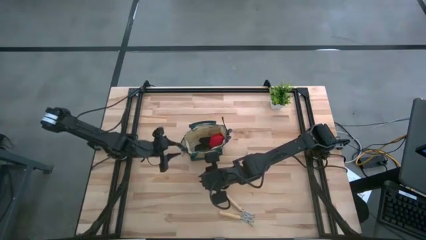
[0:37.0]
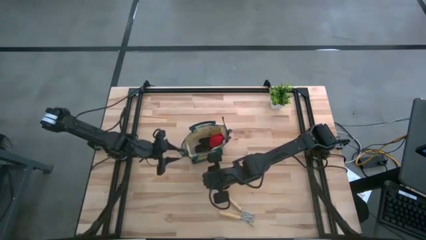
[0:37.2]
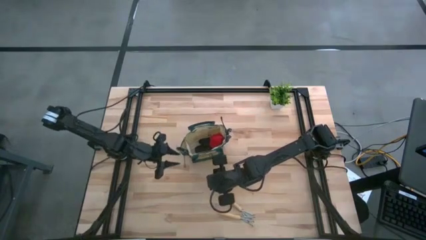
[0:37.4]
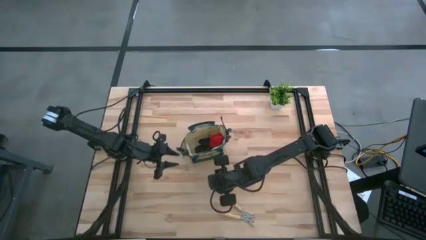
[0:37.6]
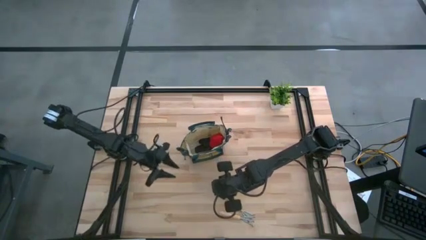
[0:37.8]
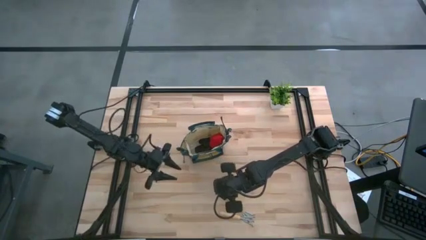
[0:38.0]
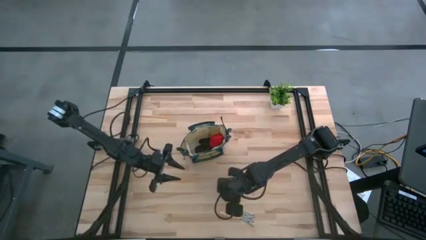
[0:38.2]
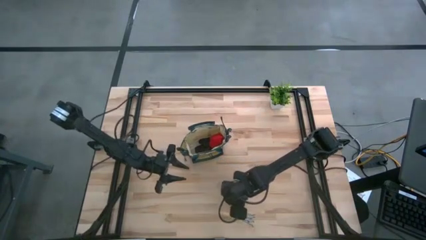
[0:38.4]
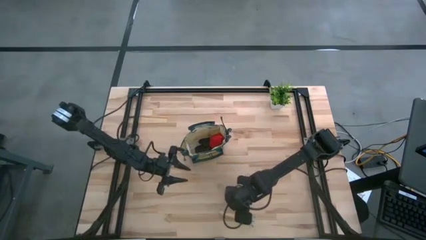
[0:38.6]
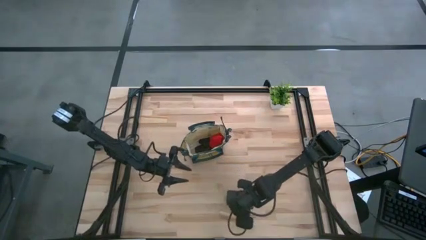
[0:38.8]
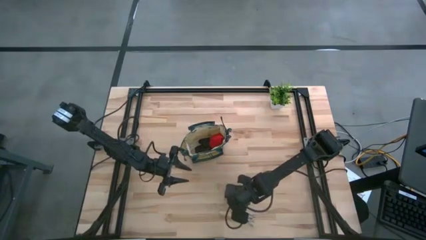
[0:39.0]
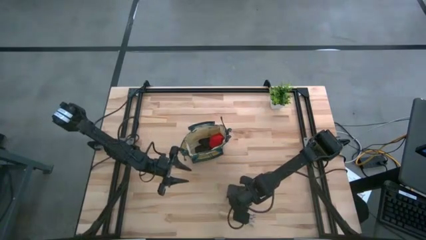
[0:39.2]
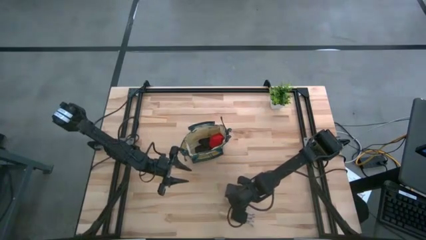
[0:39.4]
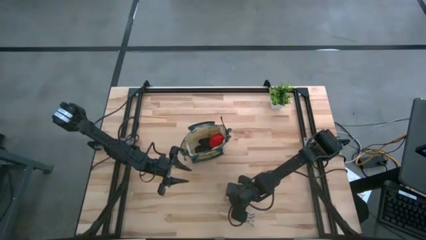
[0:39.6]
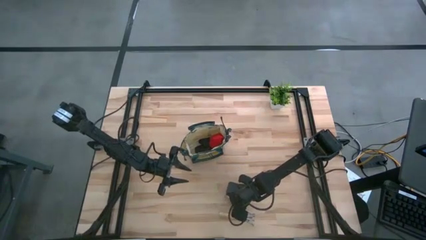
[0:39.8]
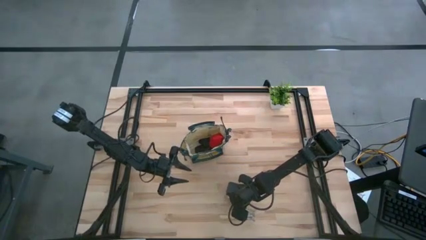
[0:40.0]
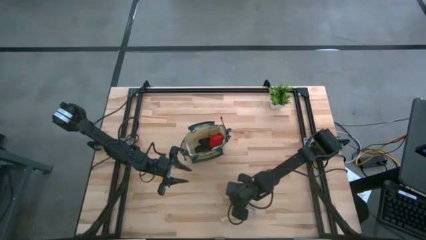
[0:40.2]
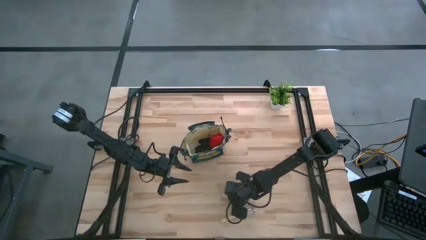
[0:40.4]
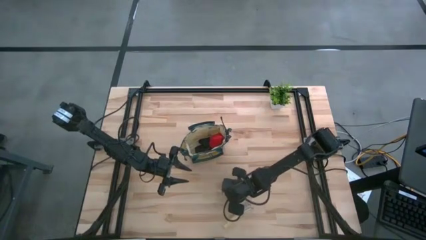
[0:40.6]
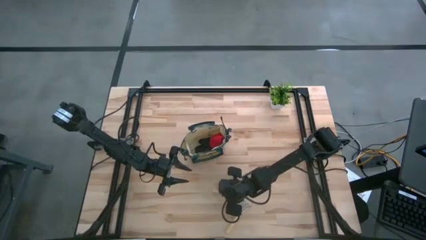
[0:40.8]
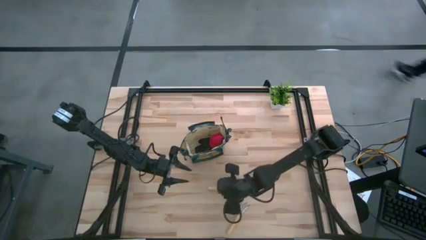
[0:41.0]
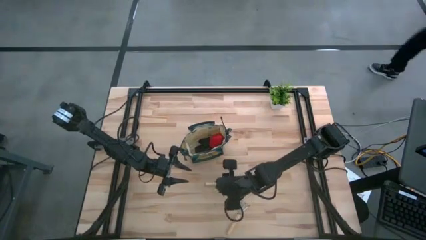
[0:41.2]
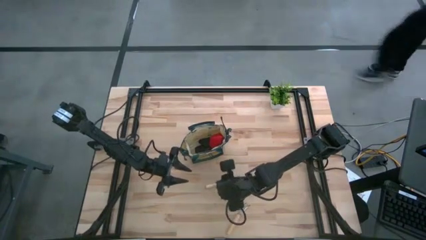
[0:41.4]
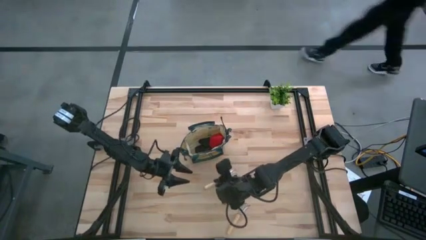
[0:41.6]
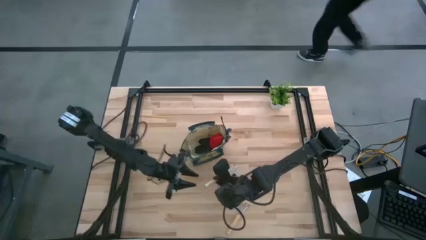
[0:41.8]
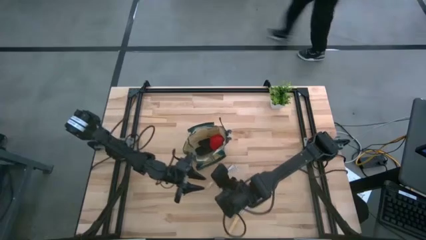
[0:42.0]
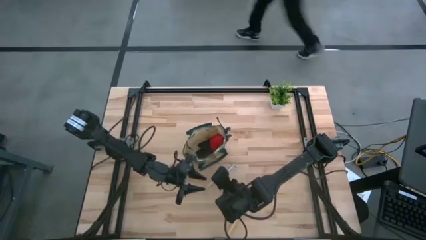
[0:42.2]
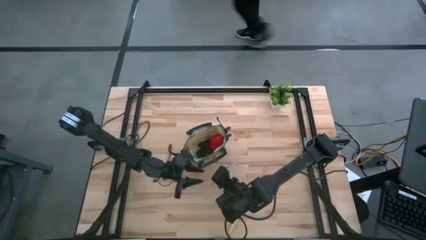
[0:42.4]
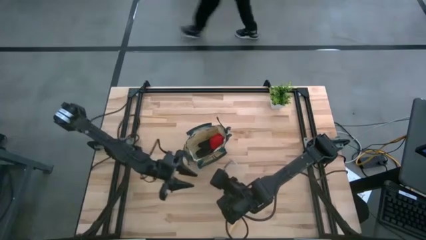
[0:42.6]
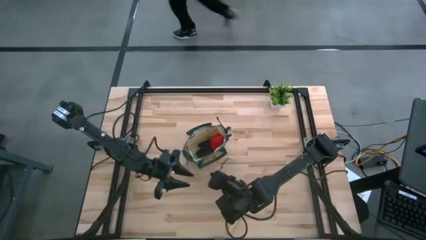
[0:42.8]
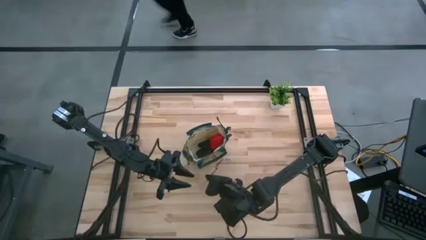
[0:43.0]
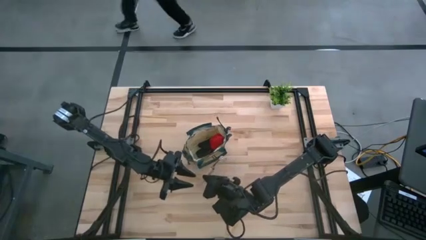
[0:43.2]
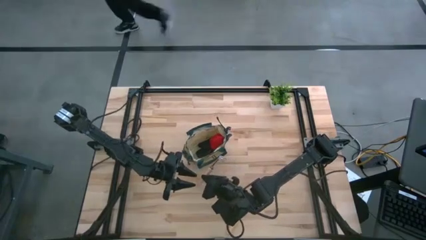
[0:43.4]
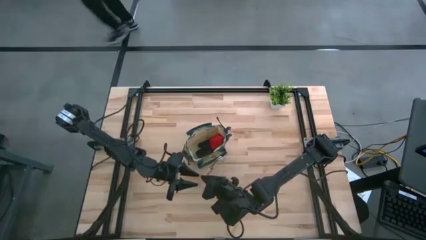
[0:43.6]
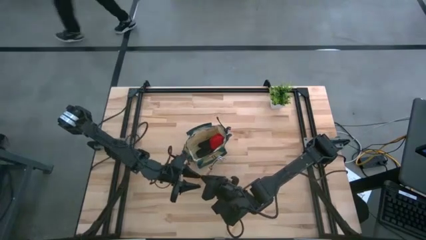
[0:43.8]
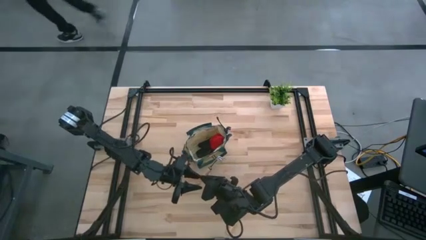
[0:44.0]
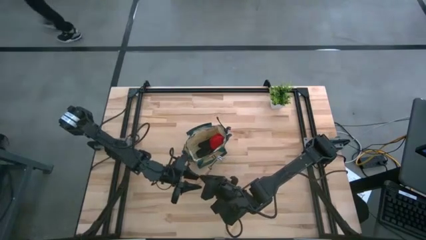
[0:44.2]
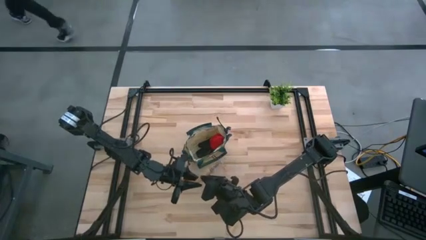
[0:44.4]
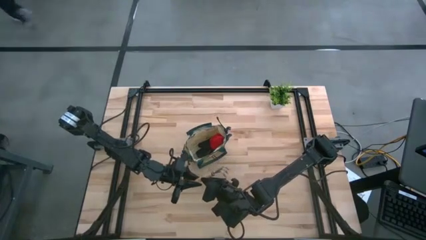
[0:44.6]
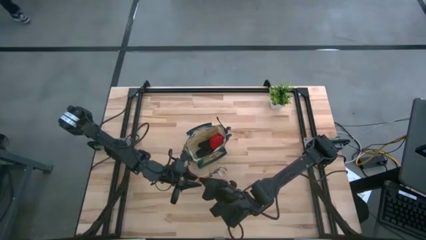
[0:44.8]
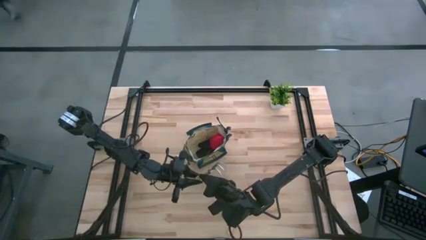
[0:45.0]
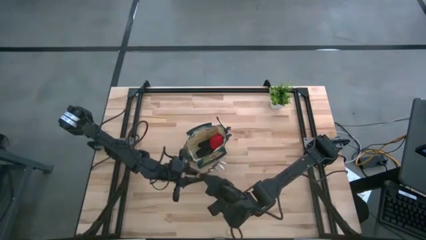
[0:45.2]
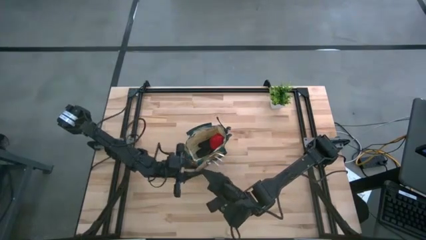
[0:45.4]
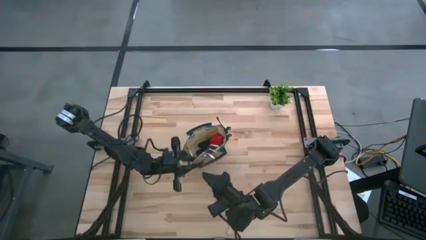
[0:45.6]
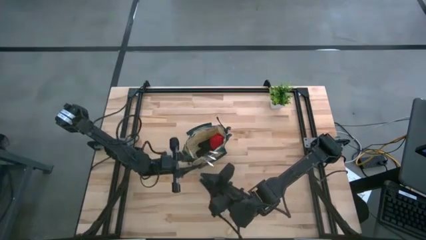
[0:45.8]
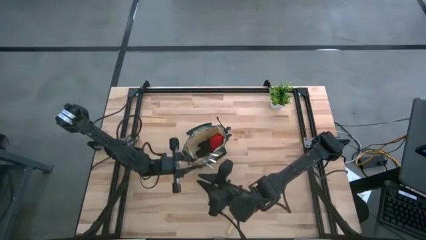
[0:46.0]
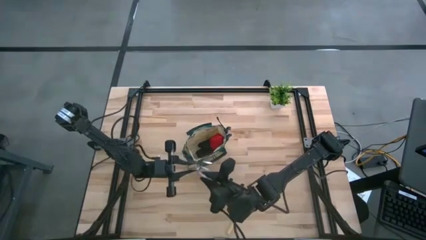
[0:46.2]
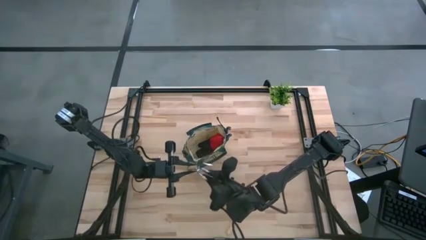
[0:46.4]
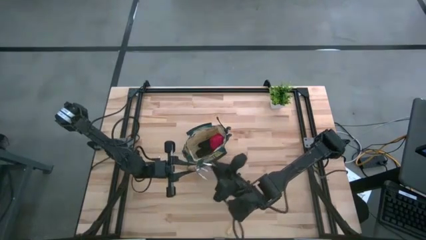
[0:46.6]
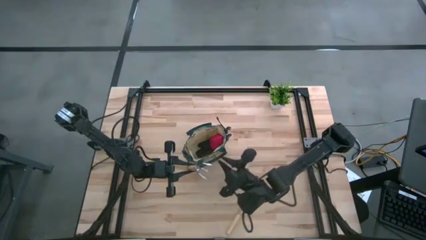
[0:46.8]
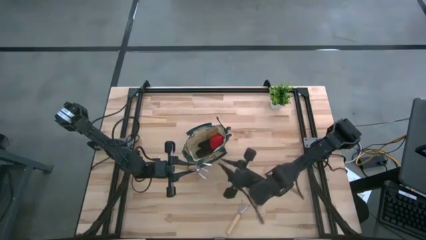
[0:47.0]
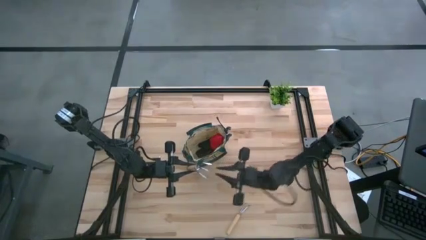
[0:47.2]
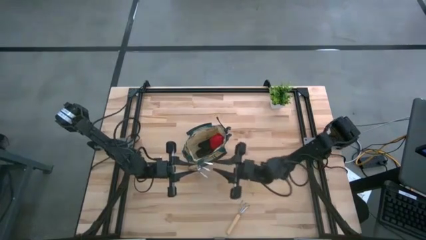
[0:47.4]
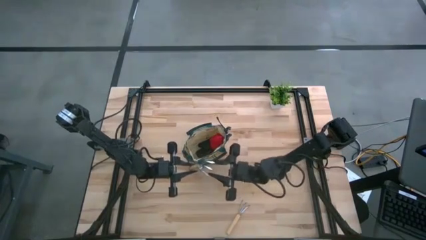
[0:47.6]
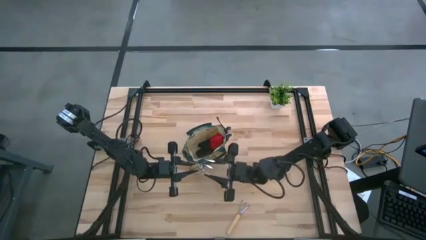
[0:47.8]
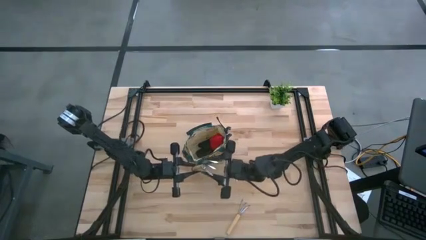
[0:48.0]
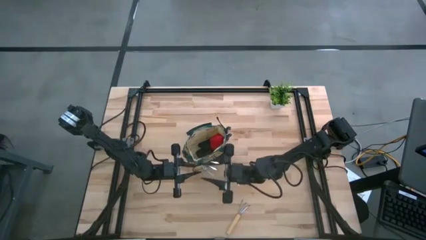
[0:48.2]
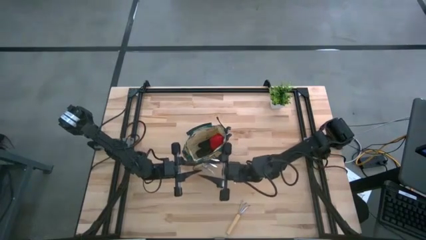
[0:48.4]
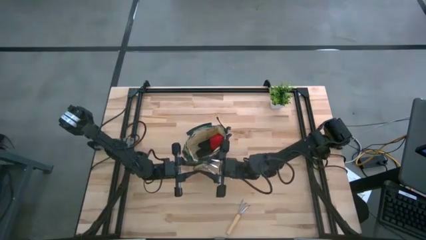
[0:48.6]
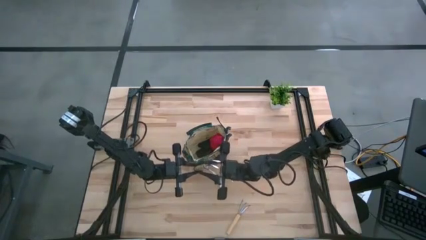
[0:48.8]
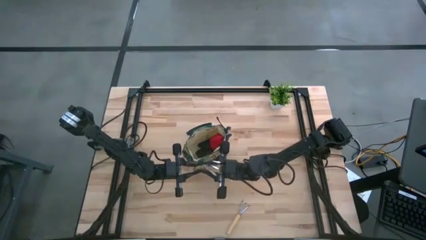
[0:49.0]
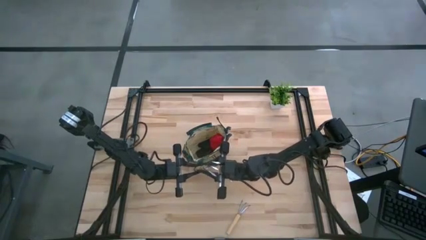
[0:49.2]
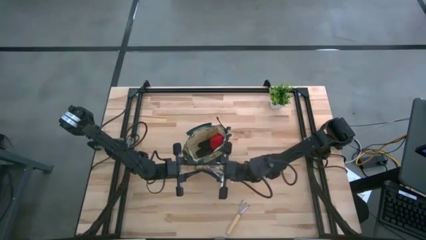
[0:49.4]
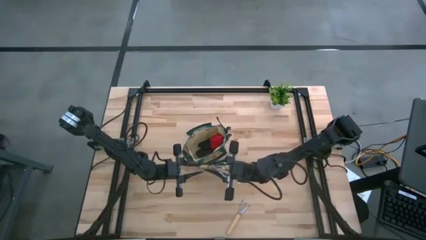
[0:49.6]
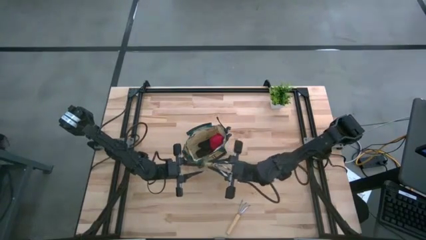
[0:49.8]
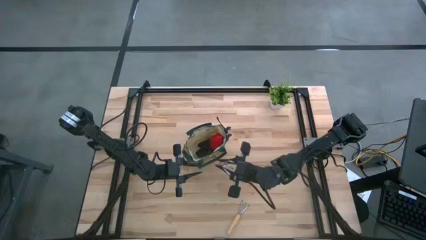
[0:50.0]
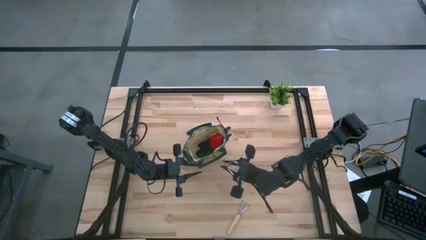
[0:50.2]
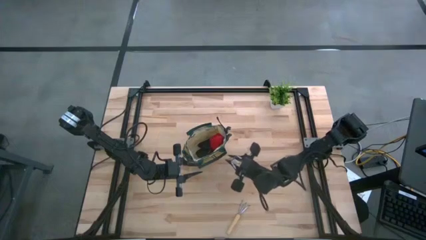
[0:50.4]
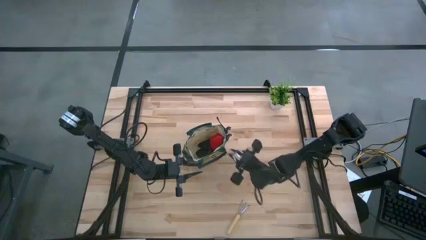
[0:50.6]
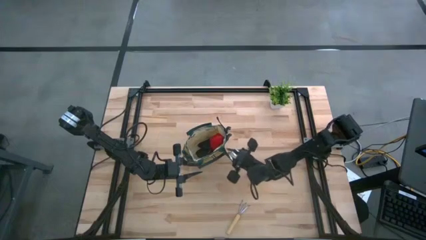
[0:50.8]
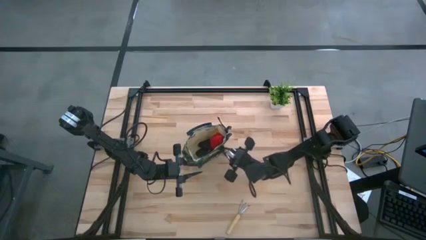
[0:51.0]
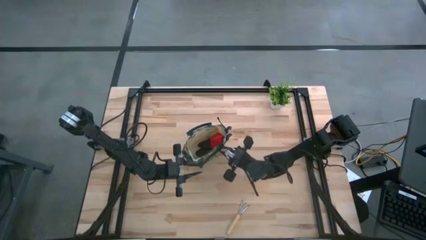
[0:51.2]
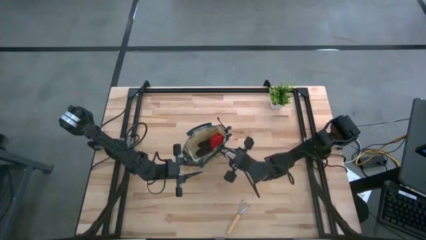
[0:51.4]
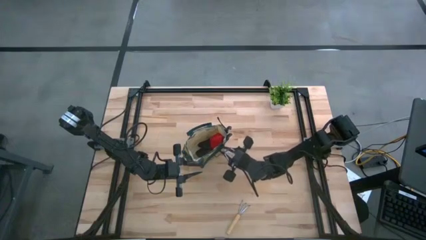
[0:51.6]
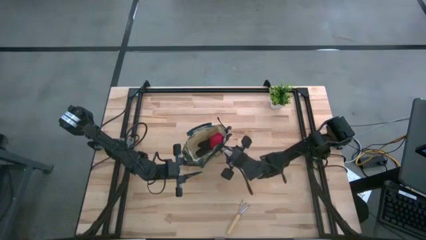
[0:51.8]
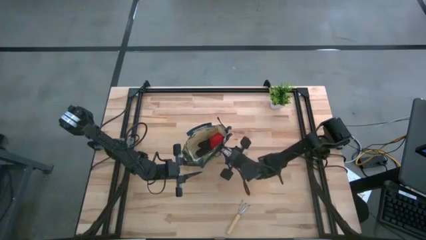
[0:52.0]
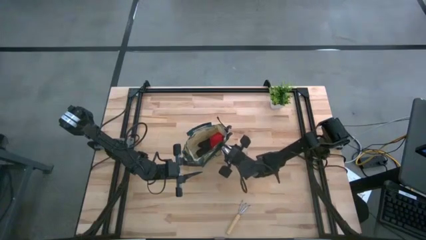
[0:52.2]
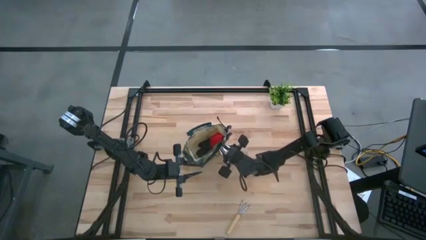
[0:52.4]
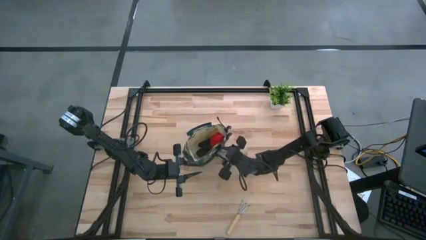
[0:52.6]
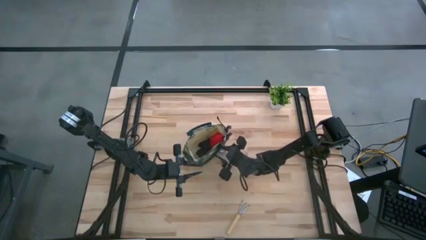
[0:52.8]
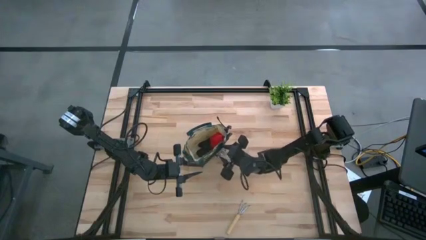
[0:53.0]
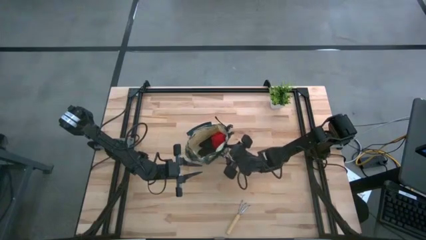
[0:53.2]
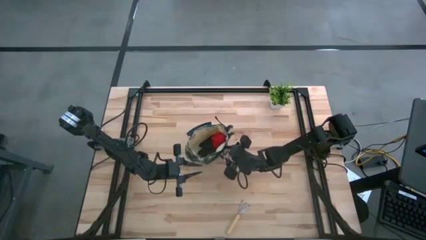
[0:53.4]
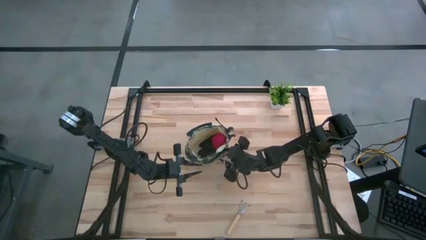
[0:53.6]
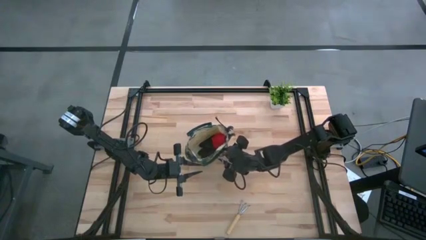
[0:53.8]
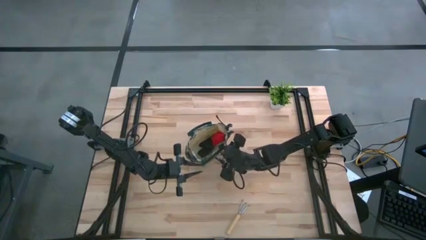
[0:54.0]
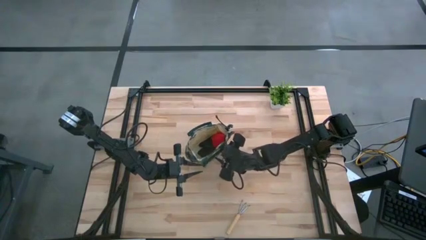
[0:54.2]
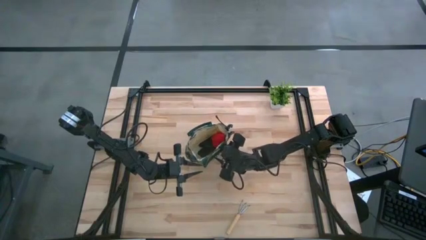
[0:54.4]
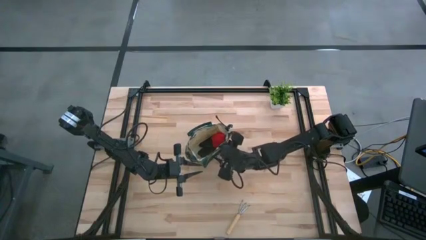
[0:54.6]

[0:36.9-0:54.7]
Task: Pick & Place Garden tools in Gardening bag
Put the top brown hand rake into the brown gardening bag
